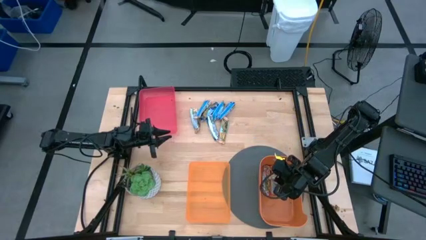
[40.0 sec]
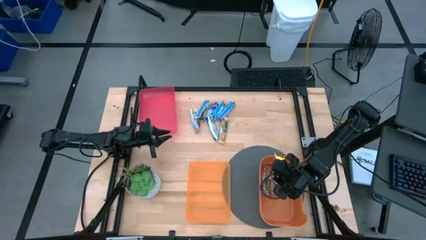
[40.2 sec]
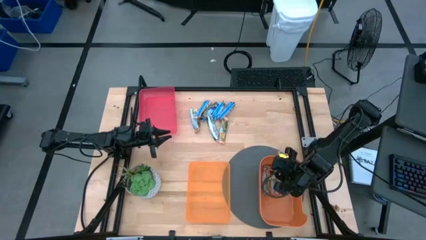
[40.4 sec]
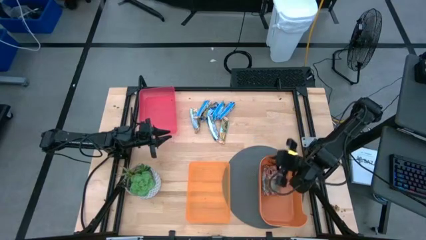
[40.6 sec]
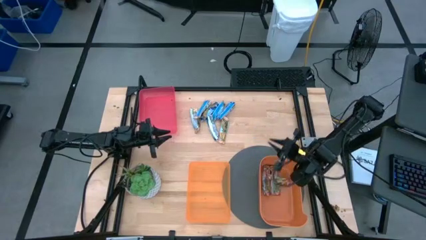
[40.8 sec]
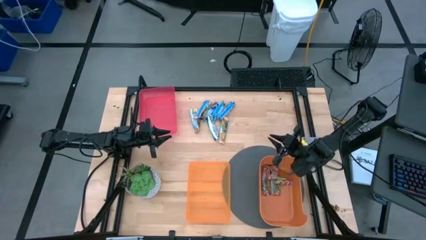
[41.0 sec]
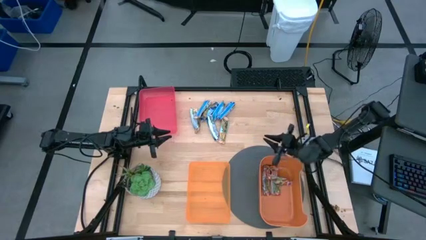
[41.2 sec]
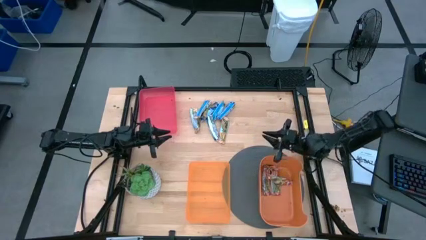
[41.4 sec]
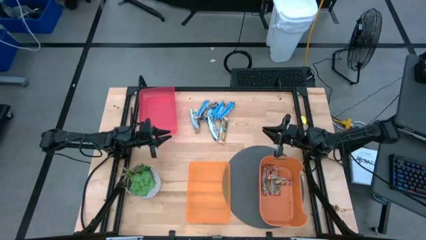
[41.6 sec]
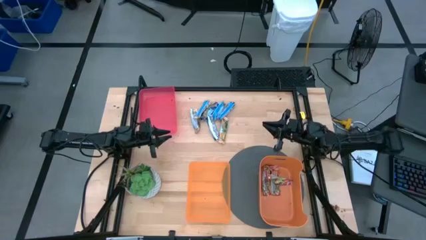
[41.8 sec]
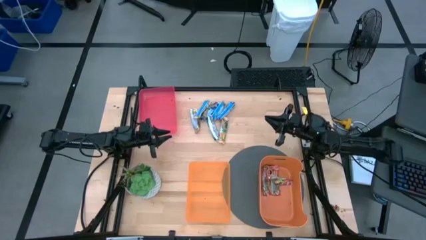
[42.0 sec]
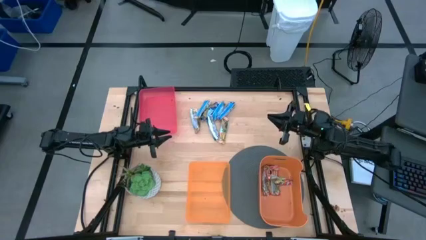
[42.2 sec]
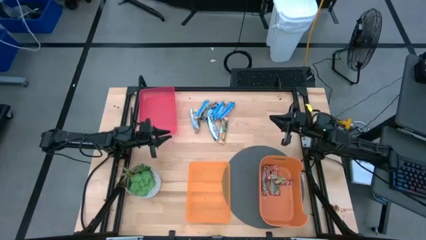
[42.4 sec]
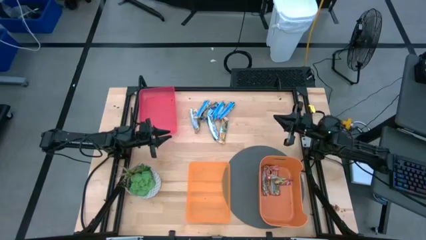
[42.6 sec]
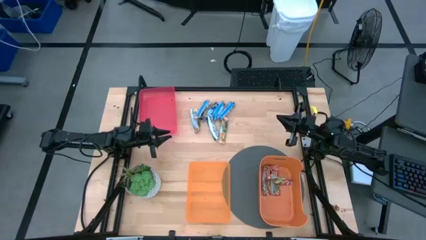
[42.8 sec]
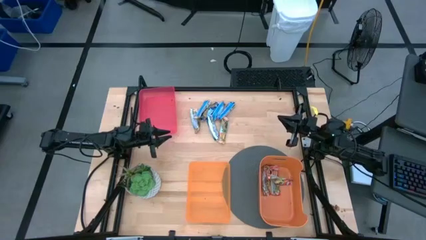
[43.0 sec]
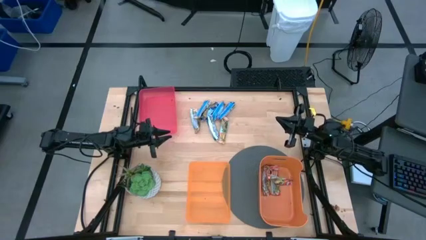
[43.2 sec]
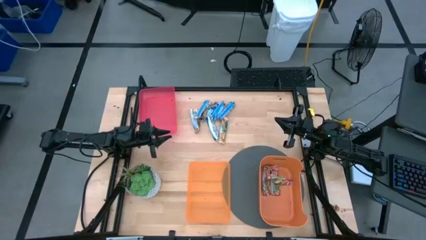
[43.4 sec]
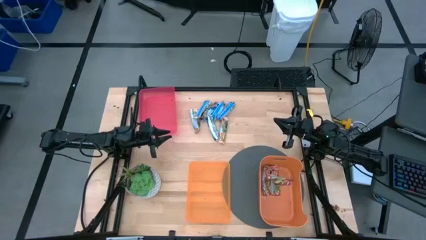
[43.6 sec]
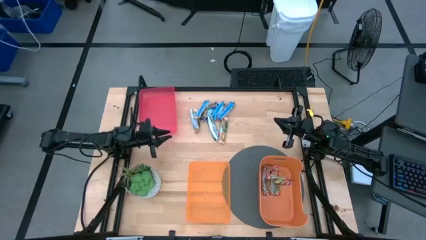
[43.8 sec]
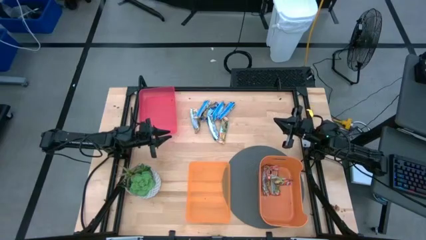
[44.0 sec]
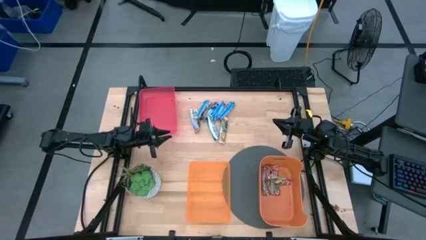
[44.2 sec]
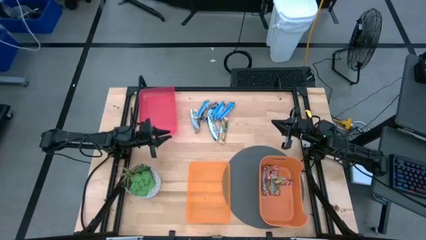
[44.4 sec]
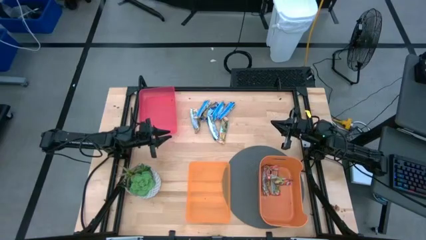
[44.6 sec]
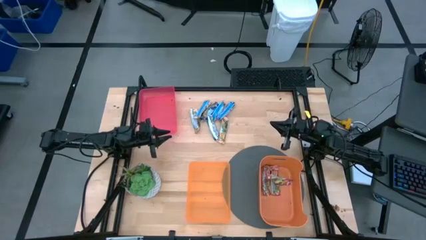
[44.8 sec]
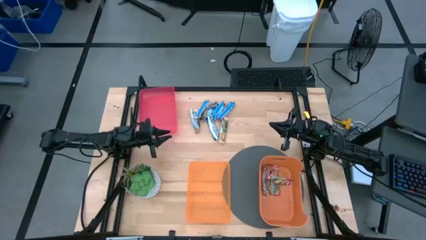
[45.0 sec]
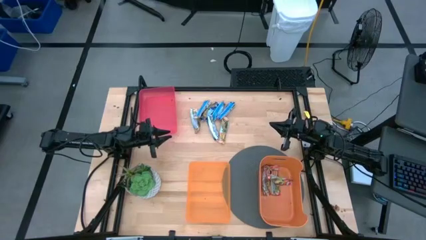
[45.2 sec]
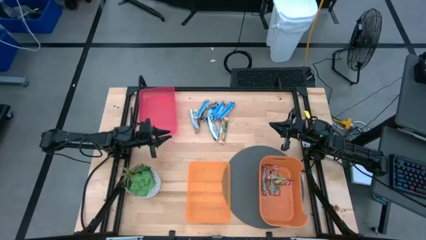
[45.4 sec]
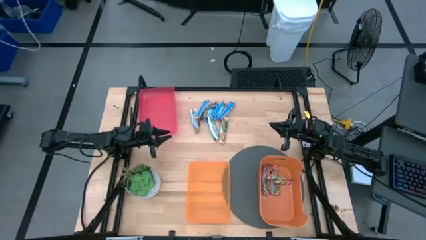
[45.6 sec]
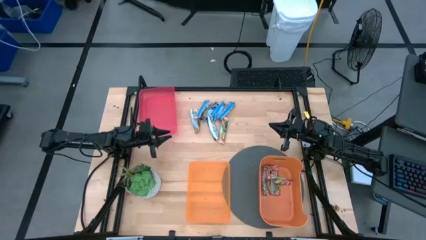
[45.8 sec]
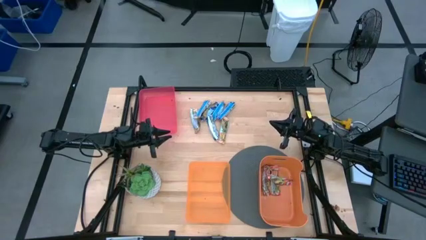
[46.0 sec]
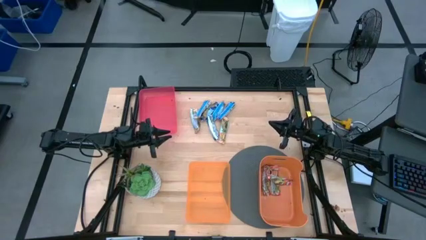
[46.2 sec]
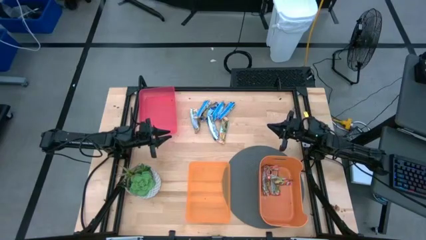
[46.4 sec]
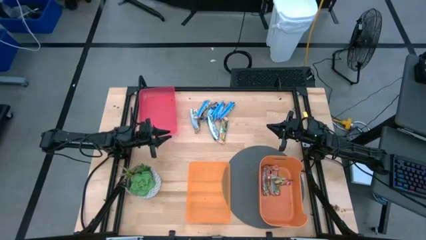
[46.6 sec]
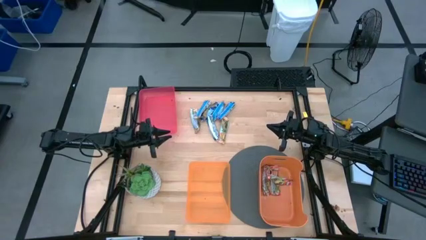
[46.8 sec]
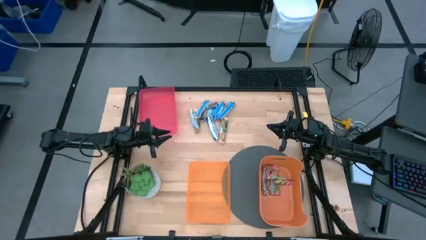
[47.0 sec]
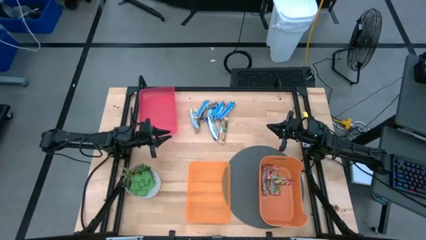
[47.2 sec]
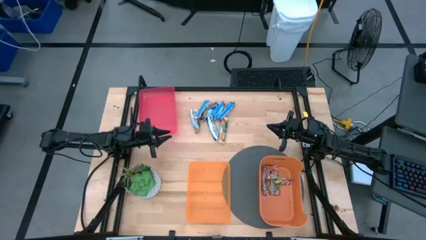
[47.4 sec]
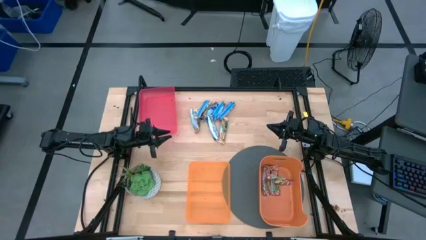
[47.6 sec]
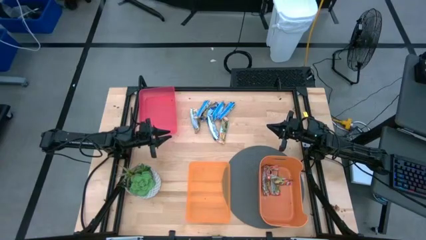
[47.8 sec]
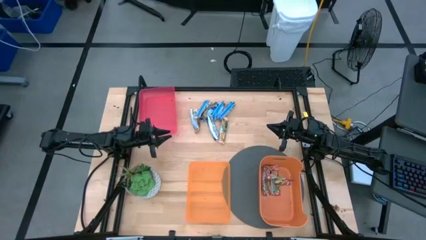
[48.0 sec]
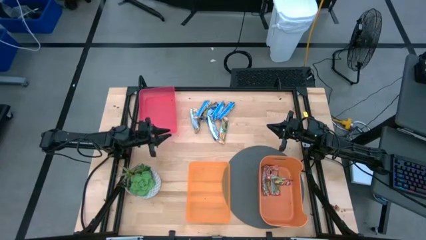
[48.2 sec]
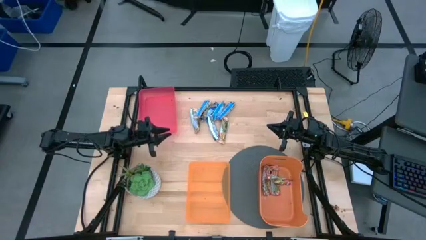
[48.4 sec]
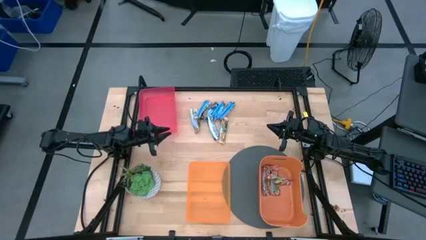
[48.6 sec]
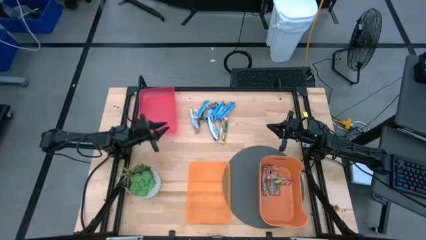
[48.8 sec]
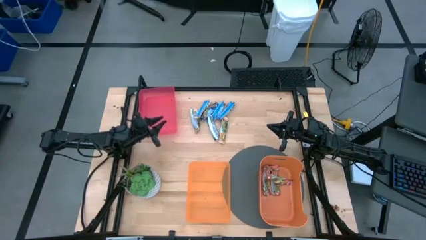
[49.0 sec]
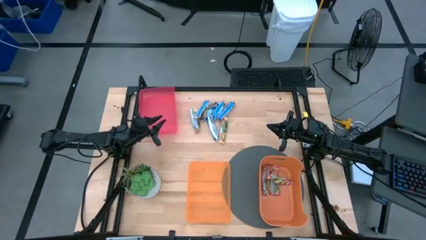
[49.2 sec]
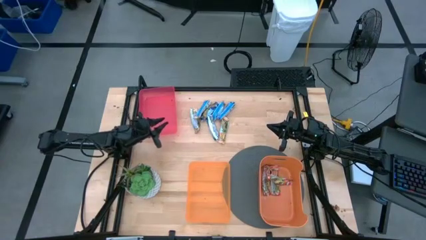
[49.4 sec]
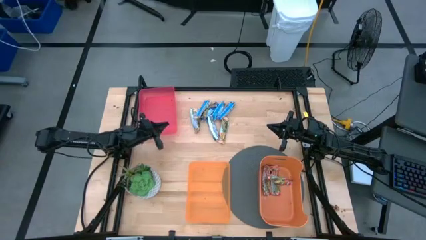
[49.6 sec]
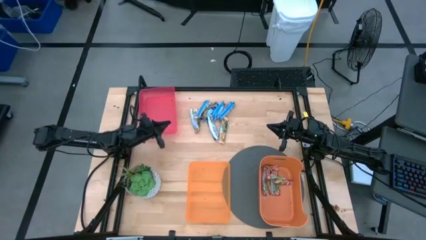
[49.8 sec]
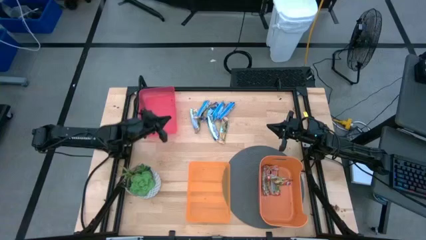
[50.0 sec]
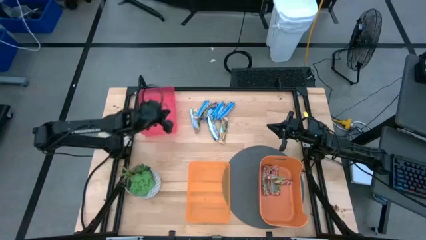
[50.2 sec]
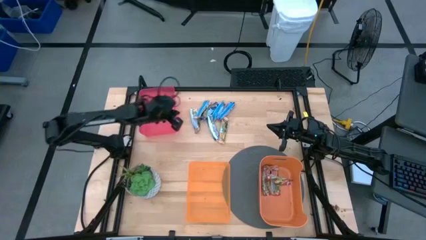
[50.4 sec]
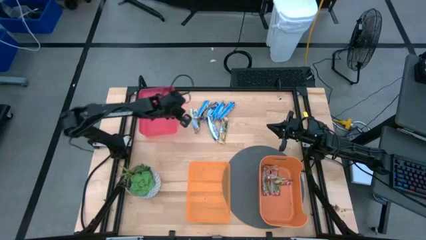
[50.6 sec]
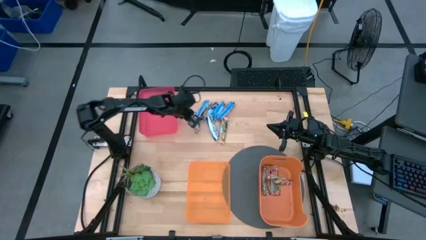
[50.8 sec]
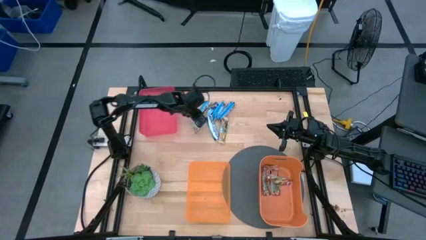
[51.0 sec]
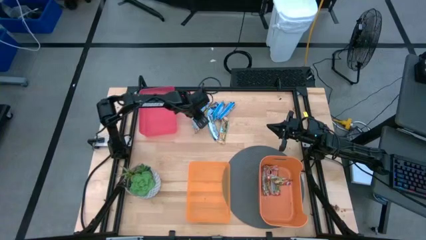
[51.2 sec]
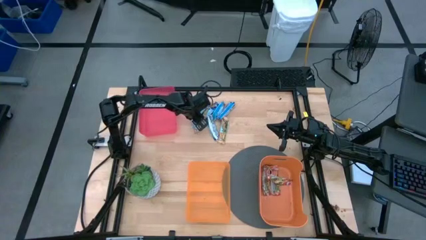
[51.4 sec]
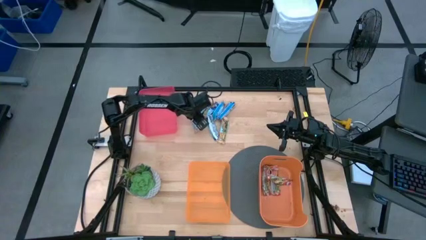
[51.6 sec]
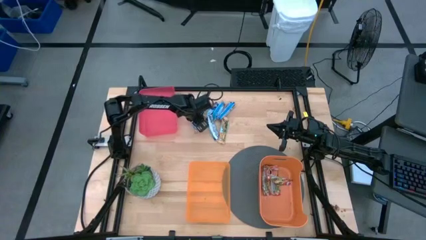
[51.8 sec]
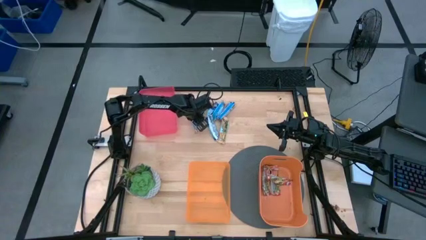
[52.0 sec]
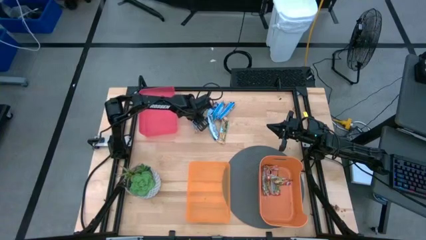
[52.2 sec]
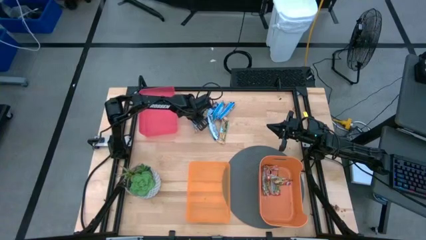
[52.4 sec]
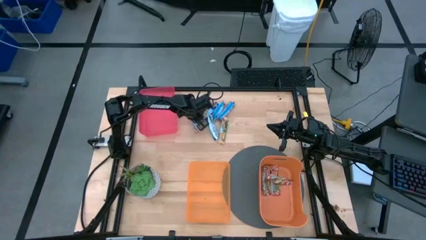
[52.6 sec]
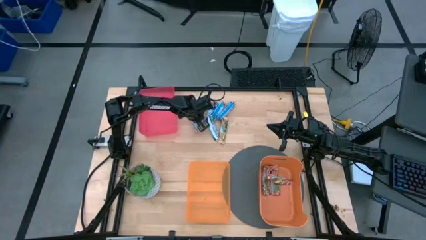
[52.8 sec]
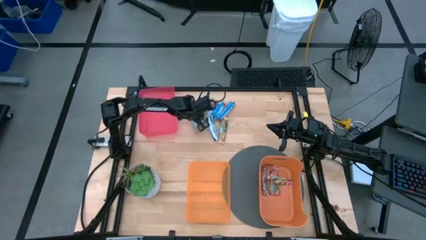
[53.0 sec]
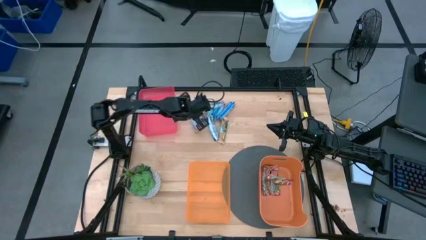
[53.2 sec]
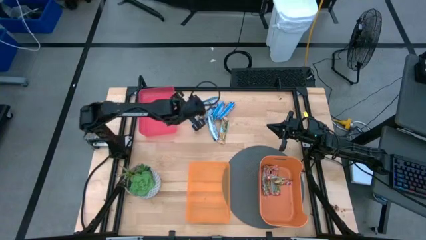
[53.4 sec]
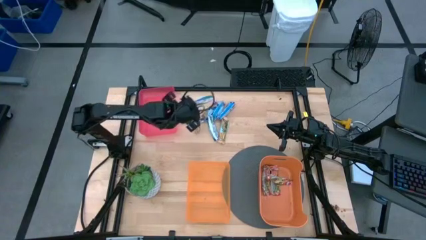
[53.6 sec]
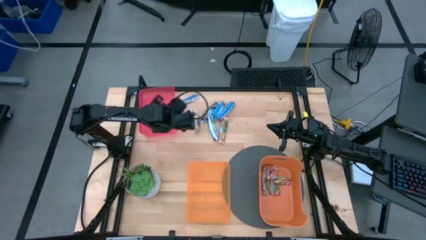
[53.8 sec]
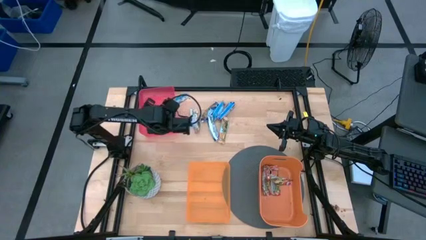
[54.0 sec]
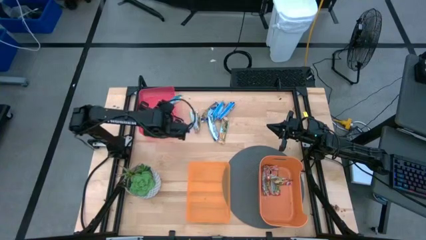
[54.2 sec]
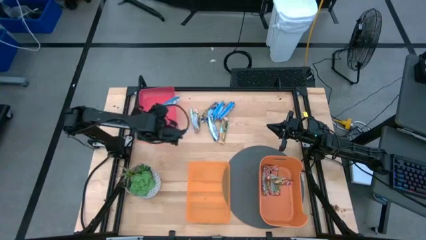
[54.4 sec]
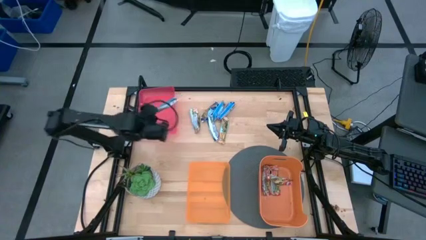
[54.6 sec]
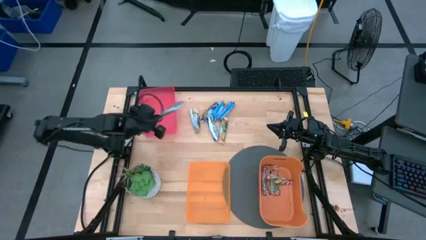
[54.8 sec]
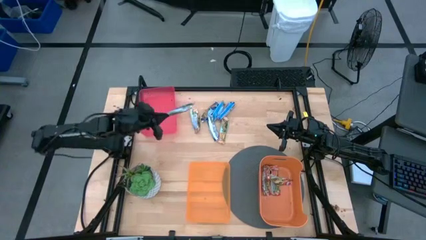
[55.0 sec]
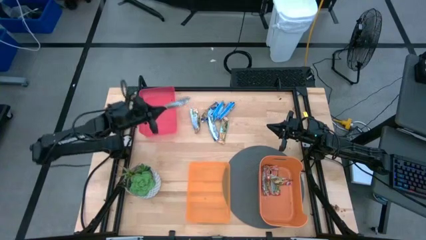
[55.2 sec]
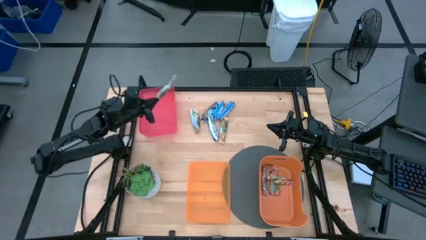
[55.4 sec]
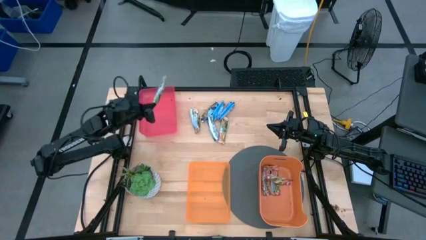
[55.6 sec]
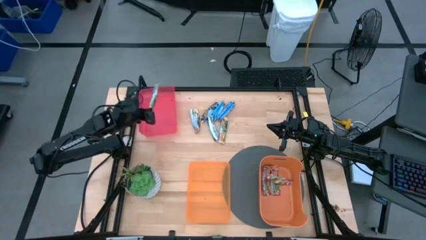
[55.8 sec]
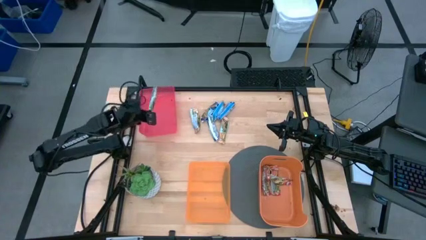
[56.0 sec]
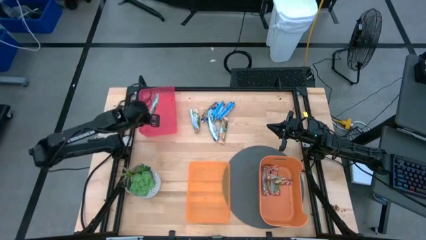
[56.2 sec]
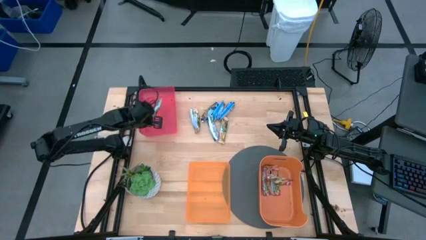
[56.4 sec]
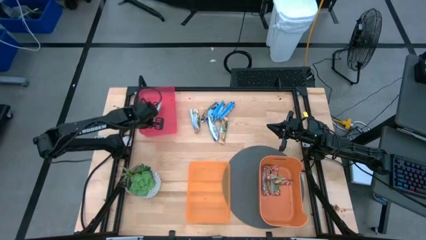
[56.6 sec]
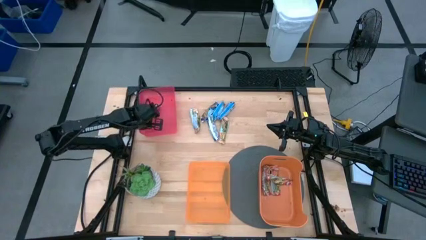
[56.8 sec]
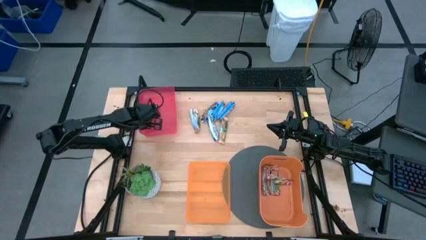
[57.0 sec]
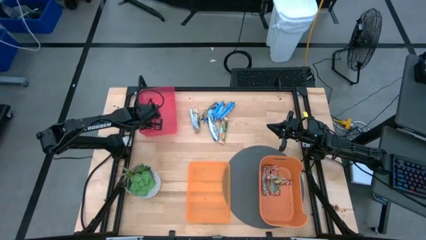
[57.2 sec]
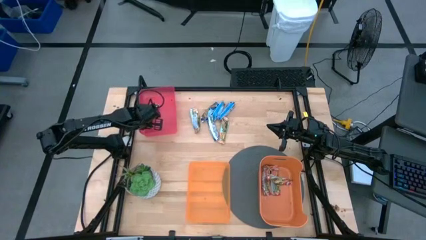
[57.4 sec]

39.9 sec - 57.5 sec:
Task: Pick and place Granola Bars by type
Put the yellow granola bar into the red bin
